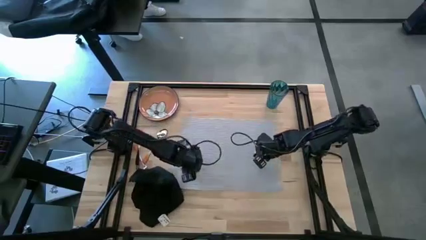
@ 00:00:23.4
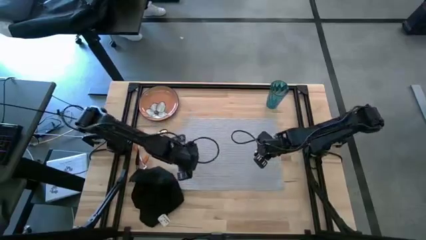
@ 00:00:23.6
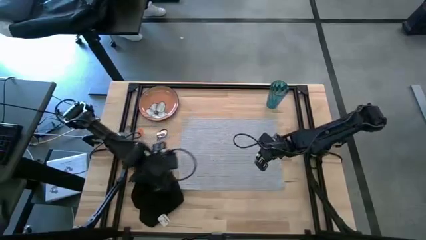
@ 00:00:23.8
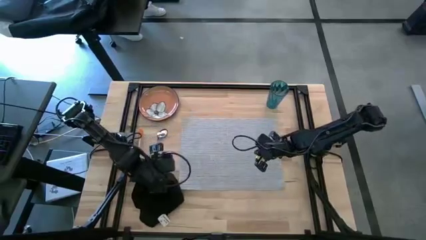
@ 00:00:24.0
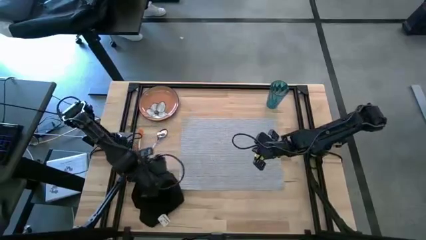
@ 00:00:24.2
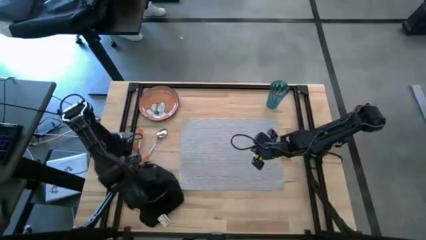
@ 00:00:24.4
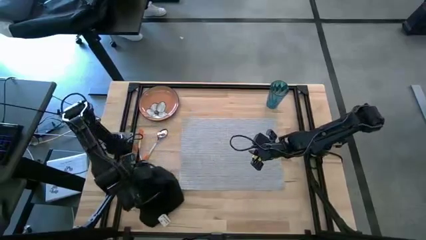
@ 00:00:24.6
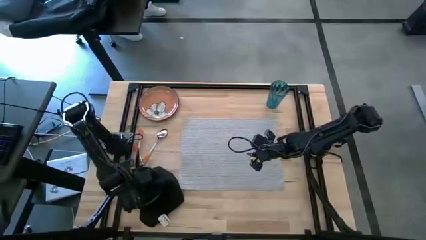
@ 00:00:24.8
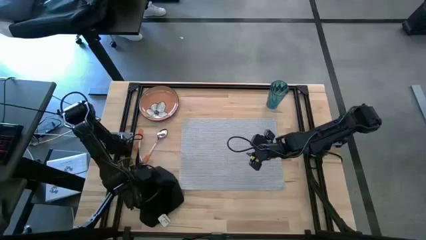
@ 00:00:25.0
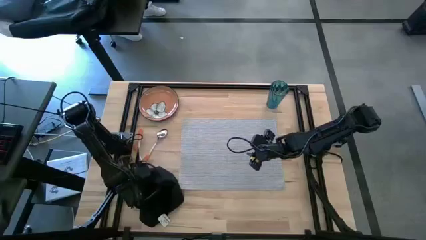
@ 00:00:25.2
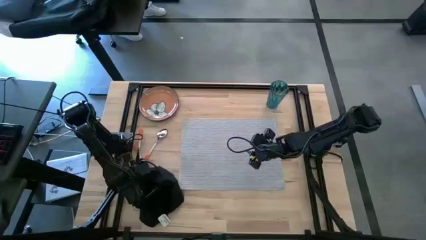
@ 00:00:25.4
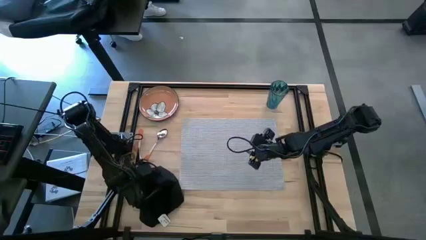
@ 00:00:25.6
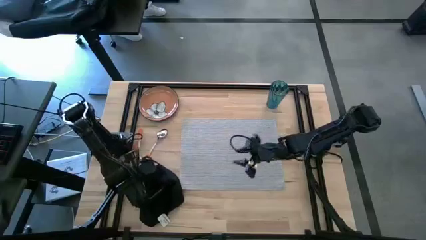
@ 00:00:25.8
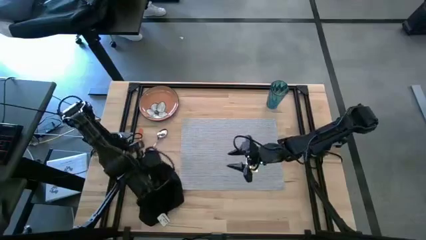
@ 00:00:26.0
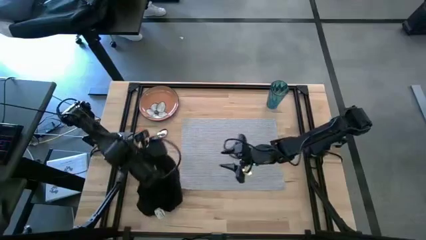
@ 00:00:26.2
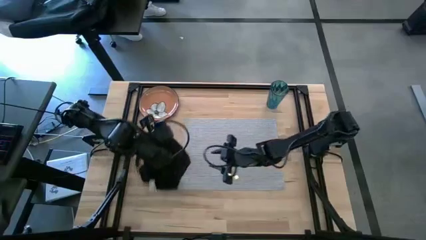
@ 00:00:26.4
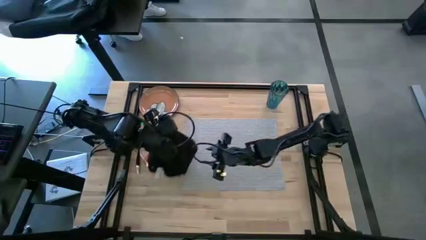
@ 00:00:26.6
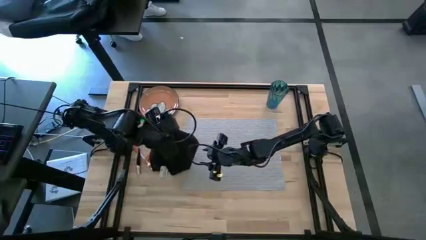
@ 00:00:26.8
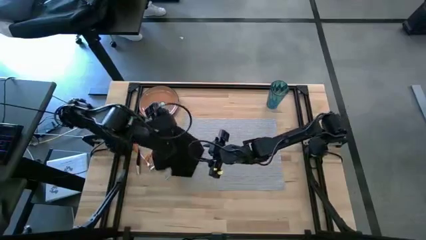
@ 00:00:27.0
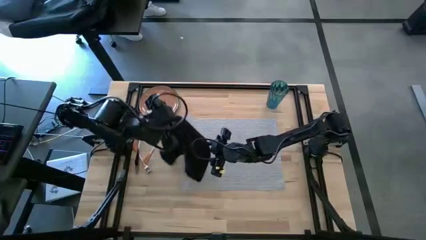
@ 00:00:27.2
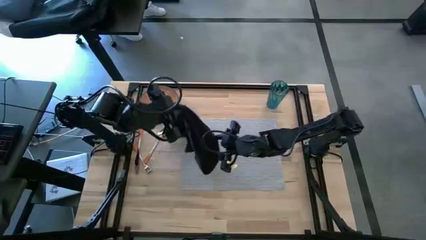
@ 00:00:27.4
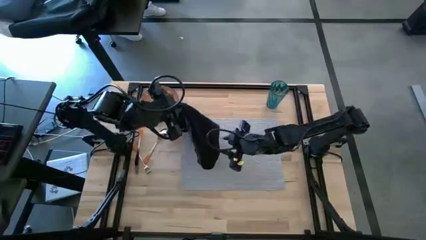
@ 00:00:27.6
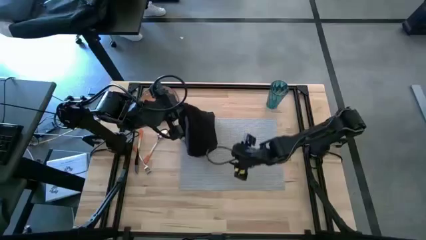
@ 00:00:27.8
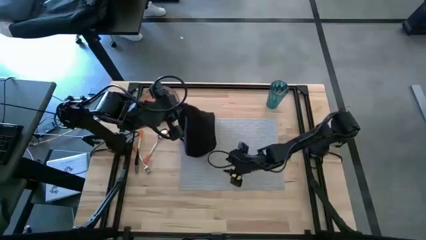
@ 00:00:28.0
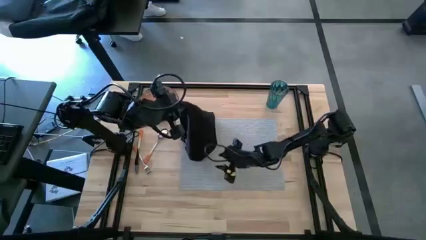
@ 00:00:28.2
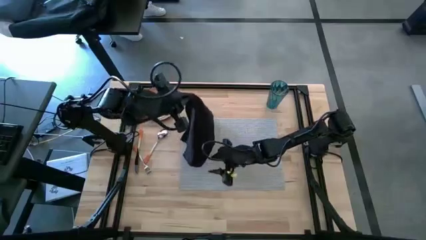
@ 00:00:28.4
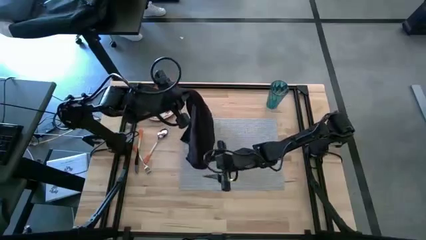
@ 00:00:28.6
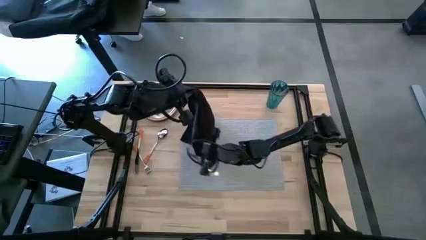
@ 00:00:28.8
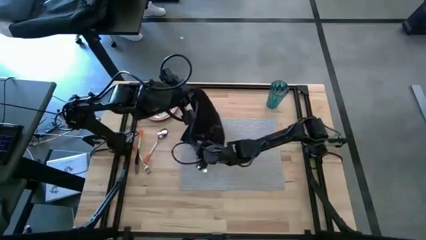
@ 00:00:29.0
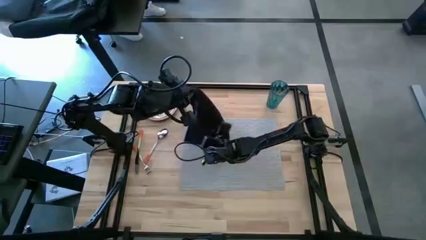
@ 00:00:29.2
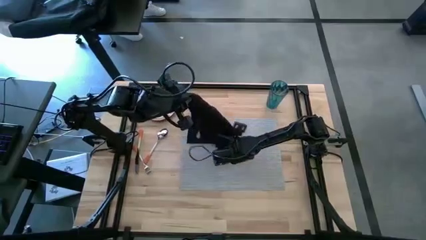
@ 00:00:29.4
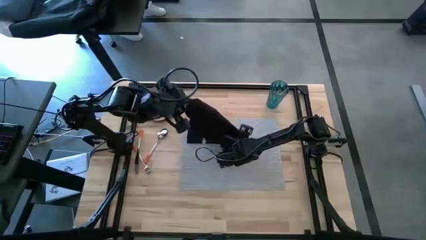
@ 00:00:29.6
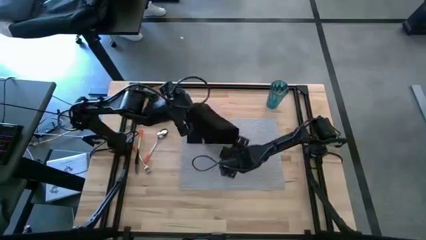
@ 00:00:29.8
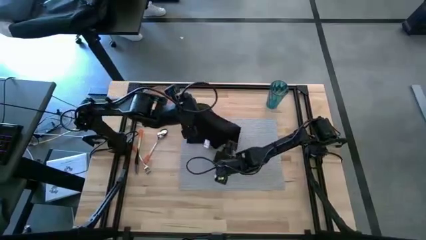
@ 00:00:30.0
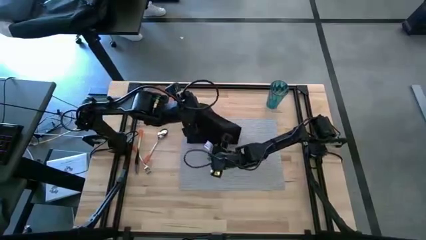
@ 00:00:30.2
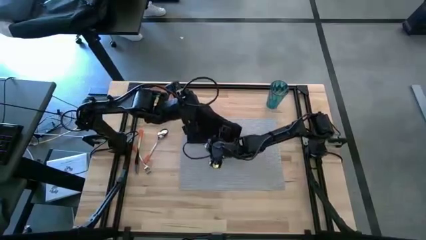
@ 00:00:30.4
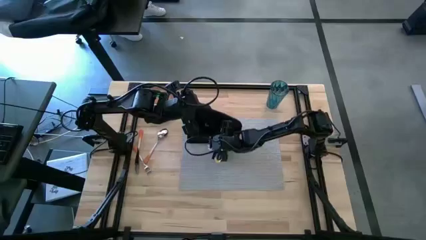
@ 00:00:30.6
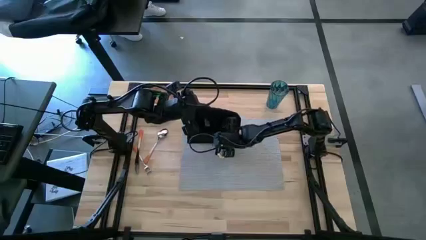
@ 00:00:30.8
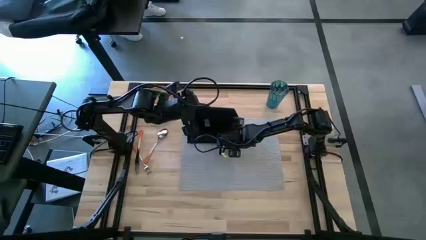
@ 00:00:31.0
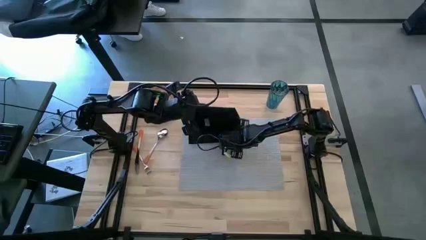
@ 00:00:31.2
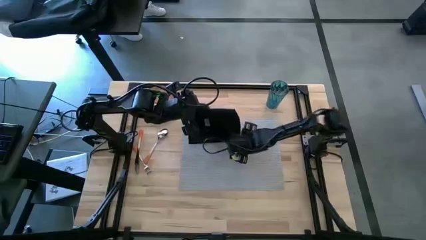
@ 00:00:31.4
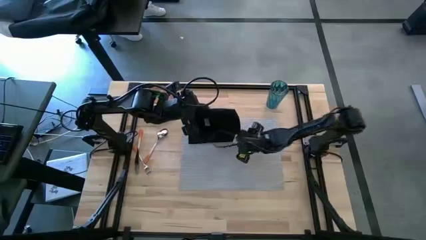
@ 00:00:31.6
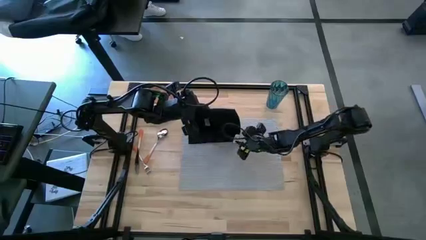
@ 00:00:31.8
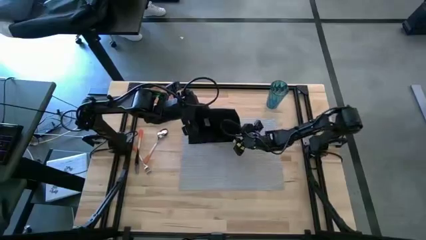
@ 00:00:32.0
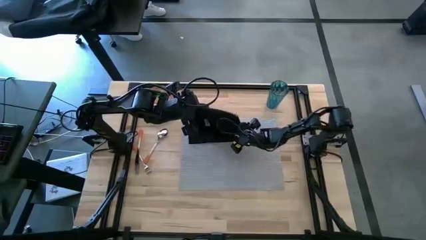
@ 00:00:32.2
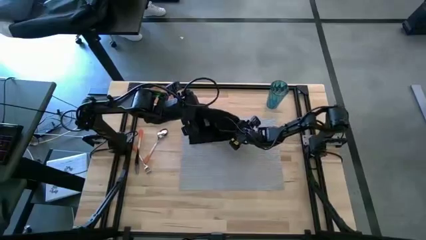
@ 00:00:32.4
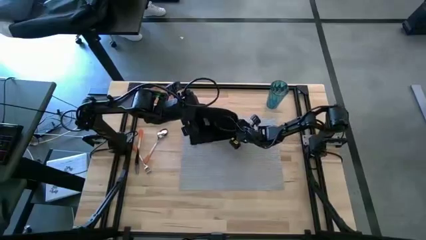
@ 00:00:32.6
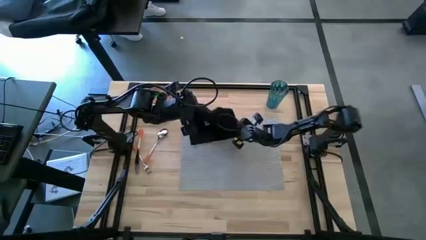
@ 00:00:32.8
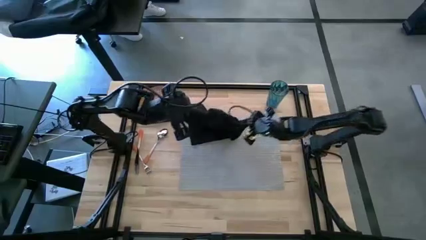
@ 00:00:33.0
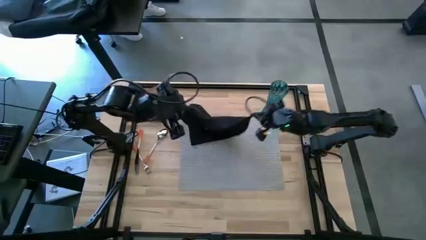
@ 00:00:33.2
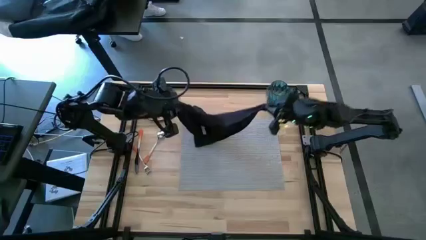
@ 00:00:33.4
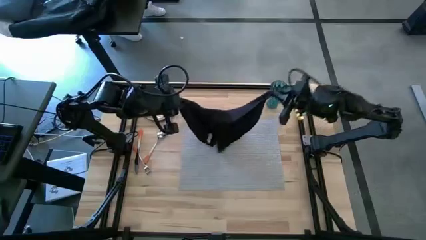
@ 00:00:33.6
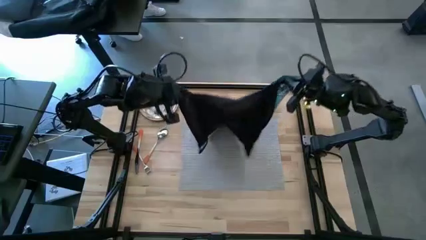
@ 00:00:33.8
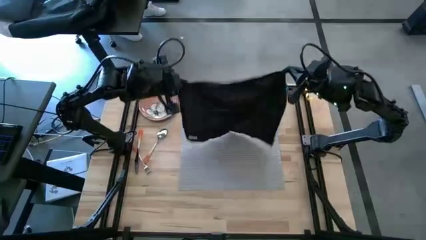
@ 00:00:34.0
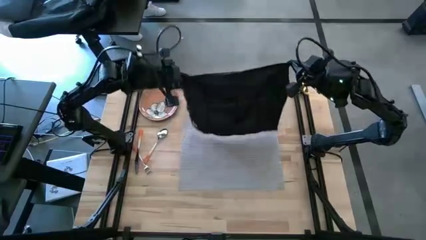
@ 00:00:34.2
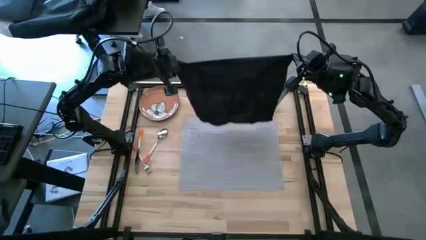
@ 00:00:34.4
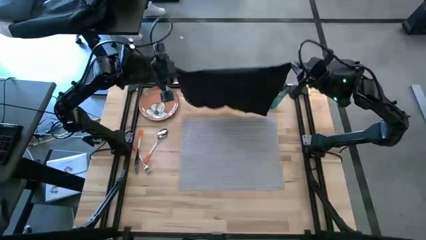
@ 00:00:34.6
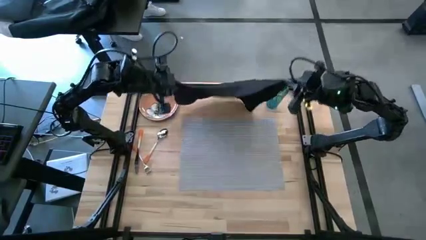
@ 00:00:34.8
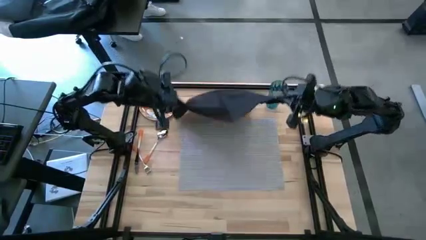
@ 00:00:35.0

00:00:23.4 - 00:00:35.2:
Task: Set table place
Fold the black table napkin

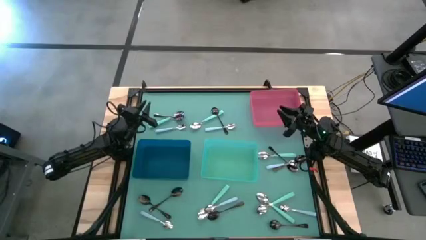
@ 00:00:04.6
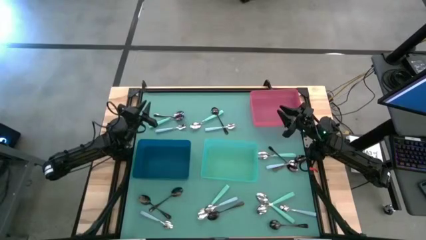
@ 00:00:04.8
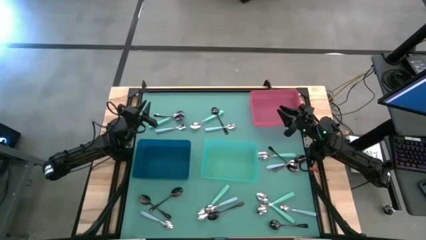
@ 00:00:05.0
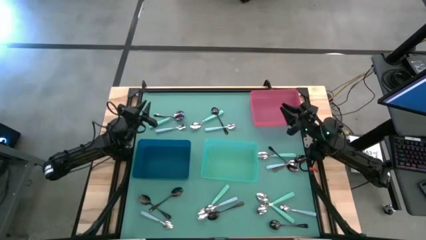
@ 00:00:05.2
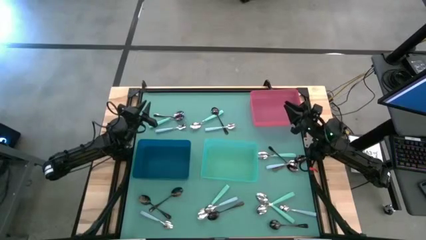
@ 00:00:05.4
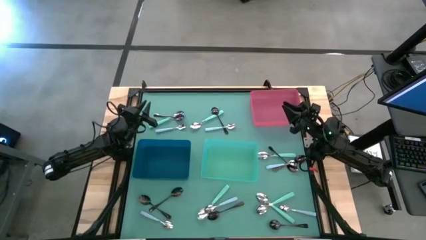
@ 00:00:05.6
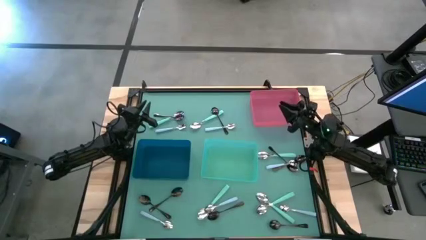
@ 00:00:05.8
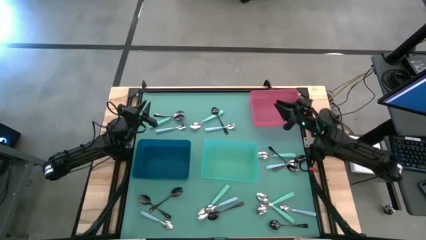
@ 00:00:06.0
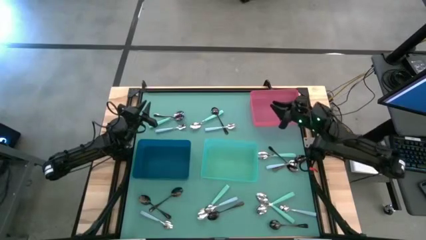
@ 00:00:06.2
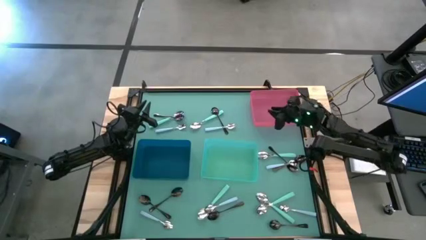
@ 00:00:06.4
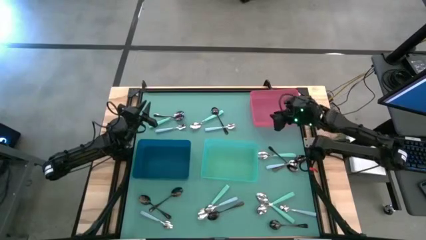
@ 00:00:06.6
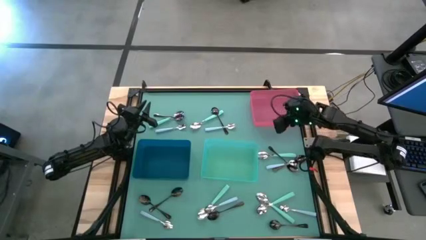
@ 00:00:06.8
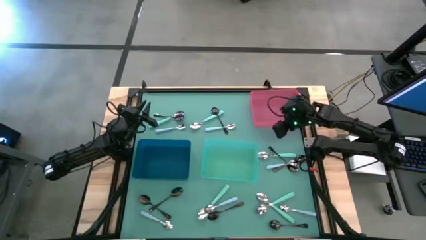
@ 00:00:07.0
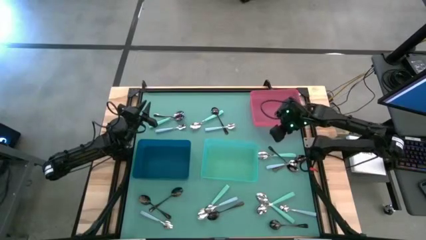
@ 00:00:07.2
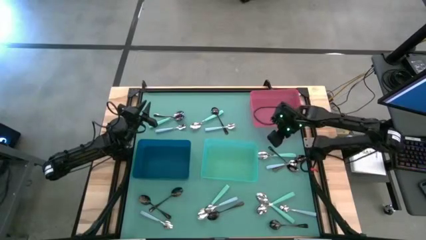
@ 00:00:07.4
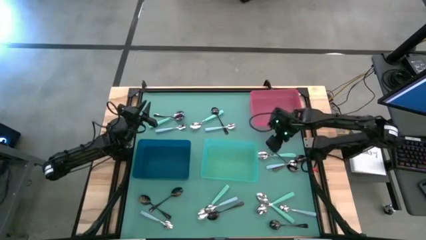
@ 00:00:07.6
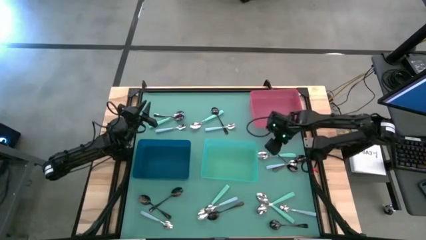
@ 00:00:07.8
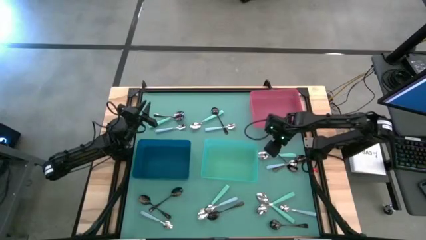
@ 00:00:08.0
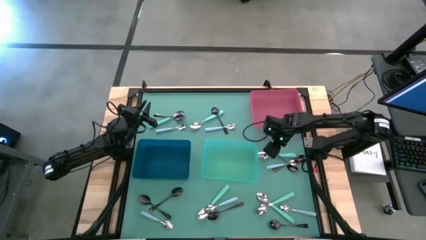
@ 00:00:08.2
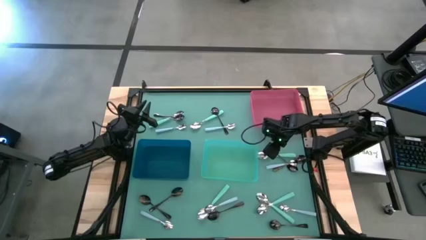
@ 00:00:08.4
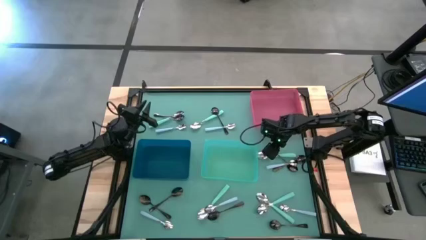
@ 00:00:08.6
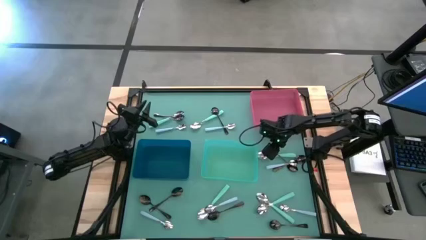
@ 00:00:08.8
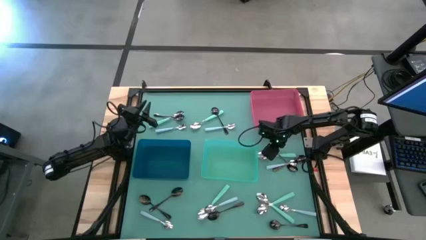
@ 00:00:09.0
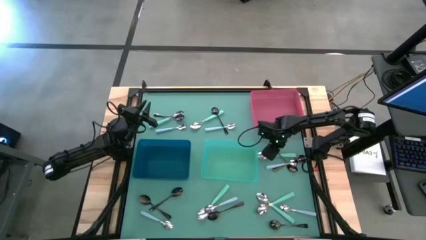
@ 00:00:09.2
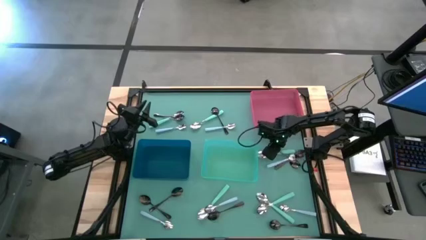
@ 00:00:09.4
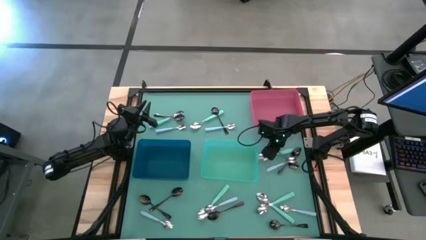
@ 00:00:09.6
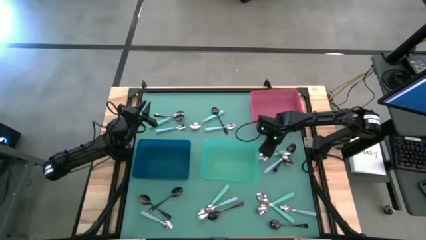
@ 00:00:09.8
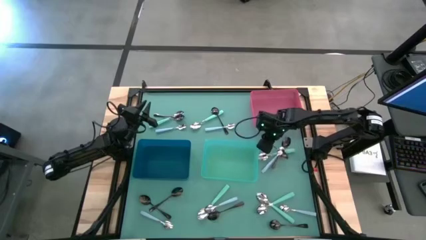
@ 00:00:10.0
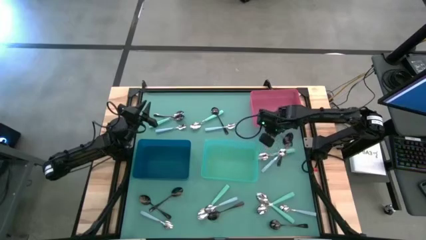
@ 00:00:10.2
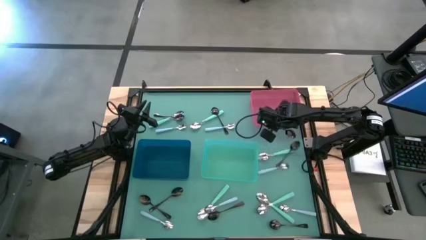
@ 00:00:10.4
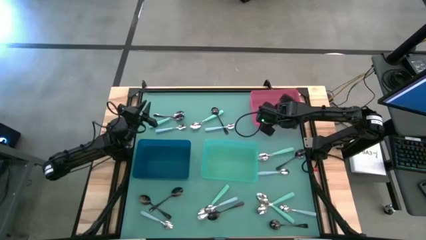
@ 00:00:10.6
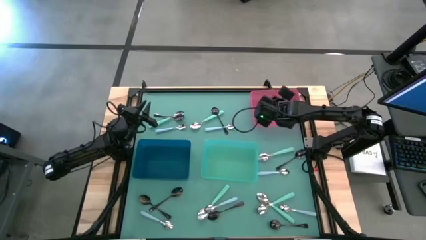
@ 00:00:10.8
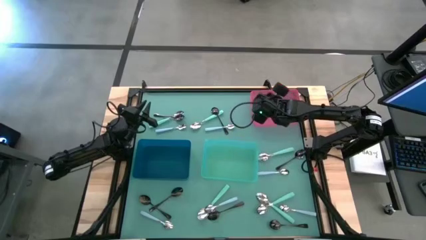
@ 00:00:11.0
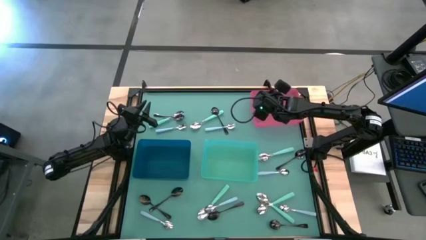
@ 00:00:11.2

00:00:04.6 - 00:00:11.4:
Task: Sort silverware by color (type)
Put the black spoon into the pink bin
